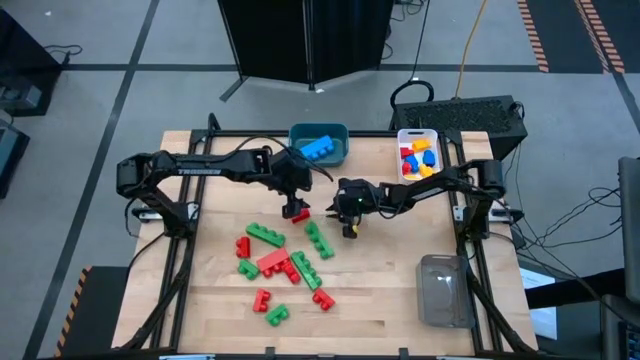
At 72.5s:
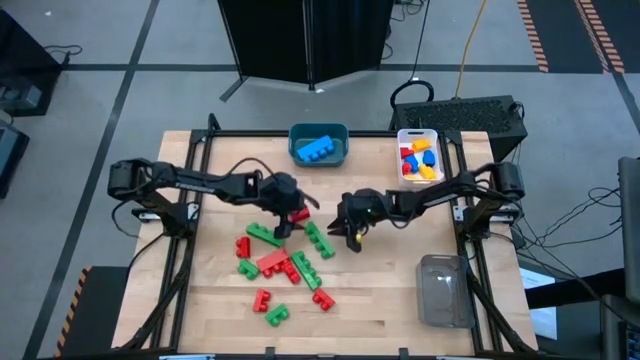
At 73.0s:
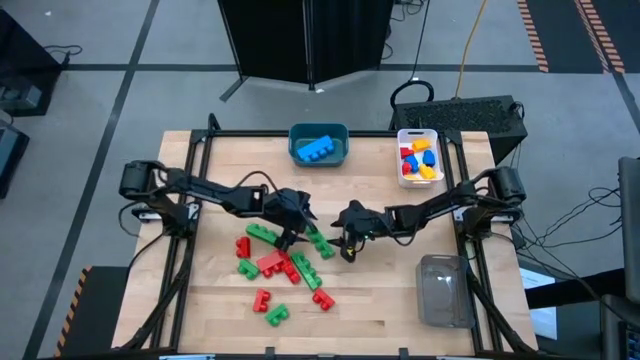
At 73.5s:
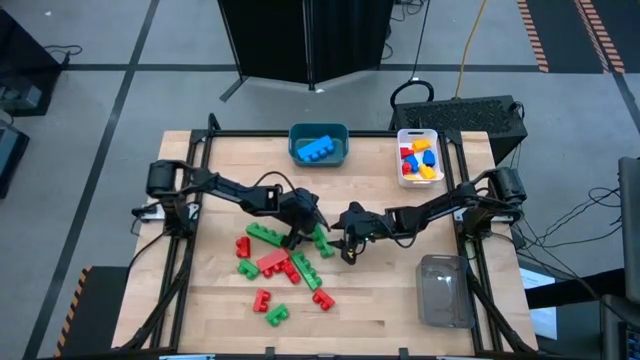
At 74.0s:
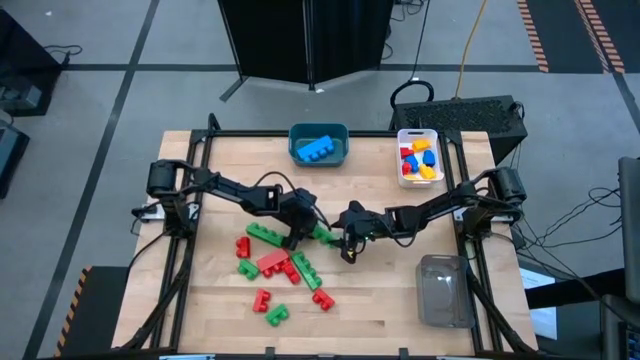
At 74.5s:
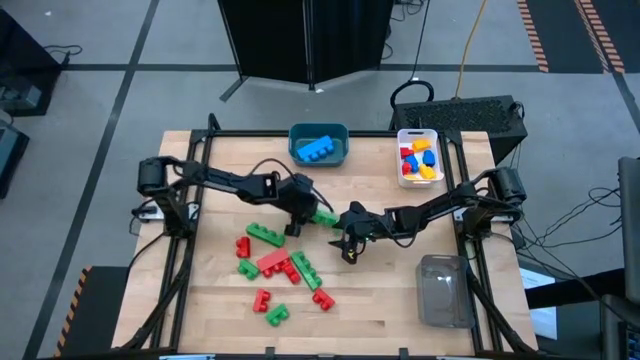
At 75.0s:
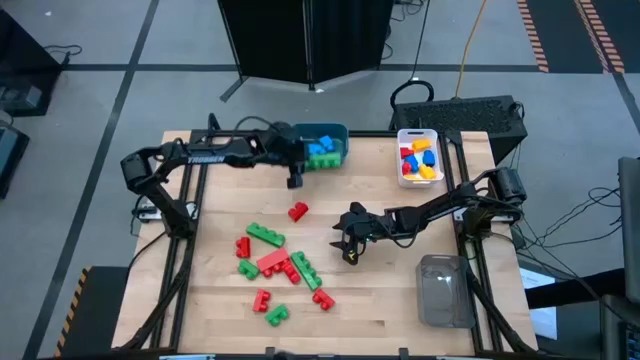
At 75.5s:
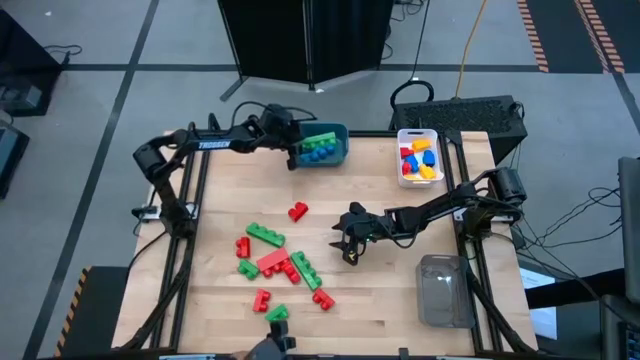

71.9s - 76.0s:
Task: Sort blocks by size
Put the four stud green game piece into the blue bin

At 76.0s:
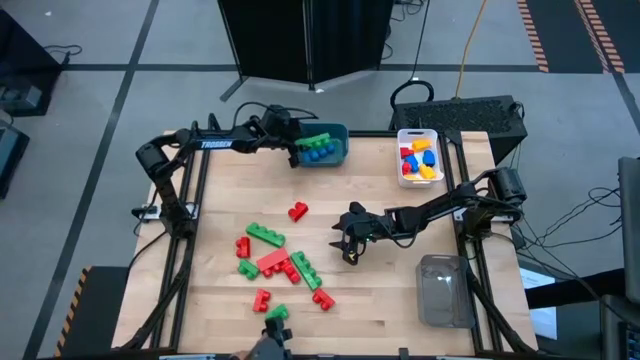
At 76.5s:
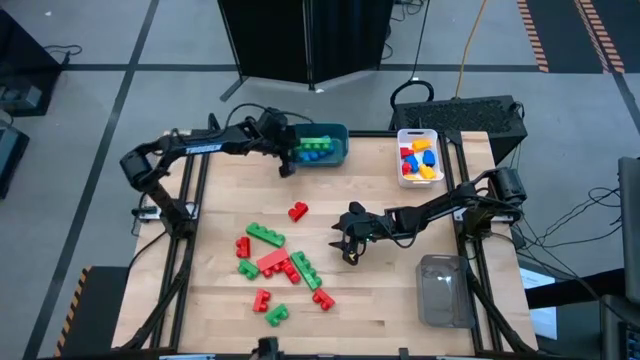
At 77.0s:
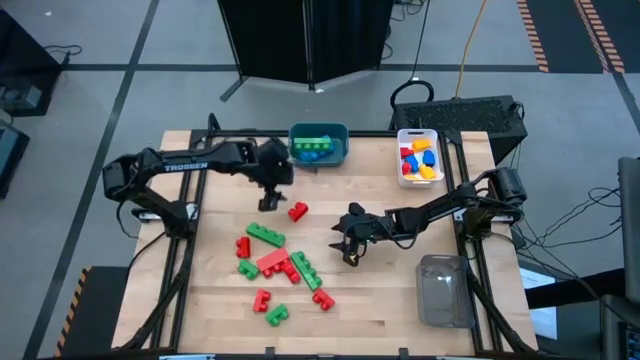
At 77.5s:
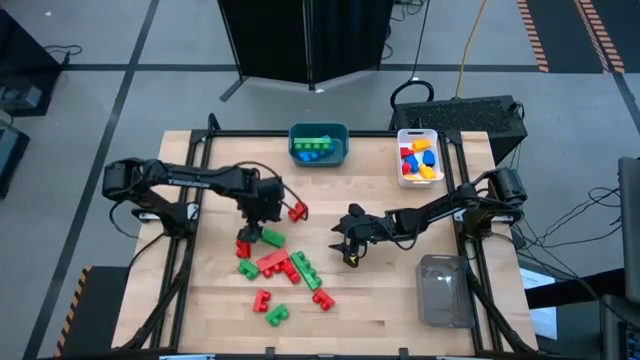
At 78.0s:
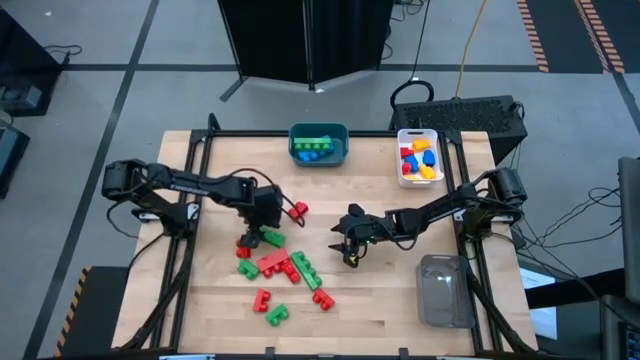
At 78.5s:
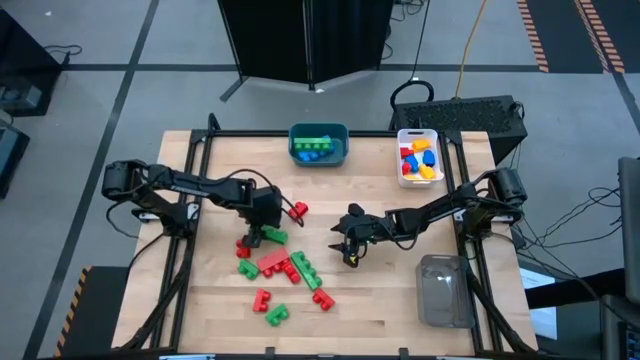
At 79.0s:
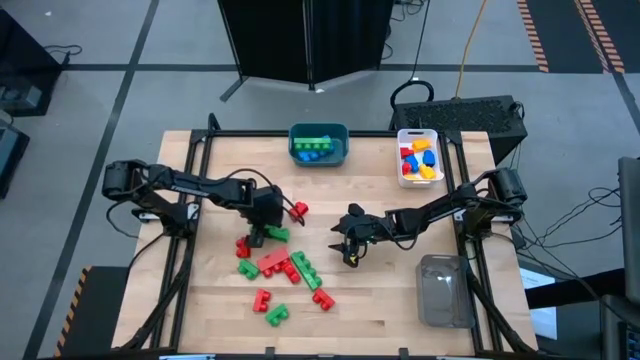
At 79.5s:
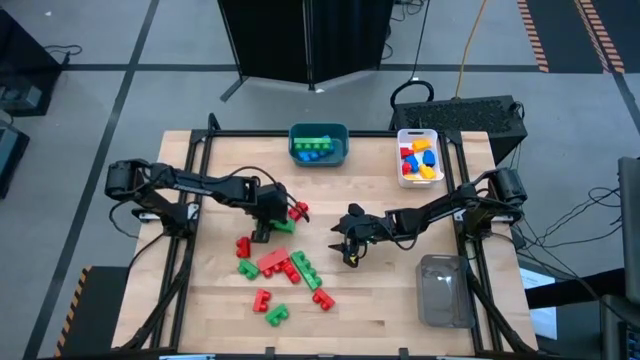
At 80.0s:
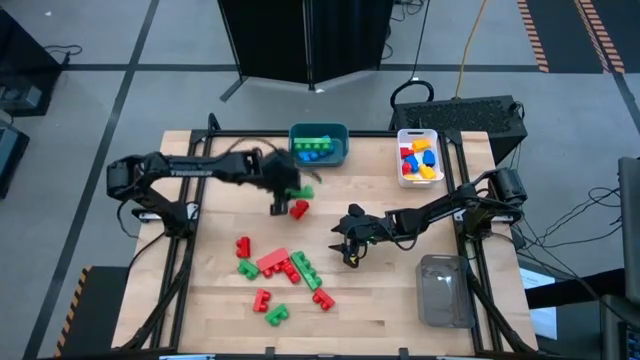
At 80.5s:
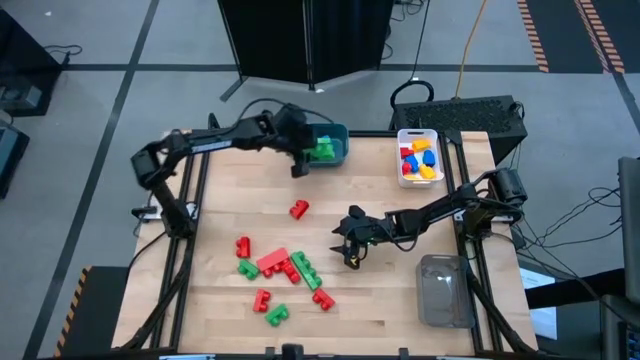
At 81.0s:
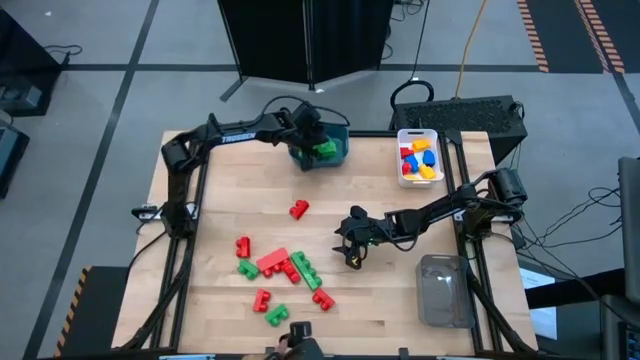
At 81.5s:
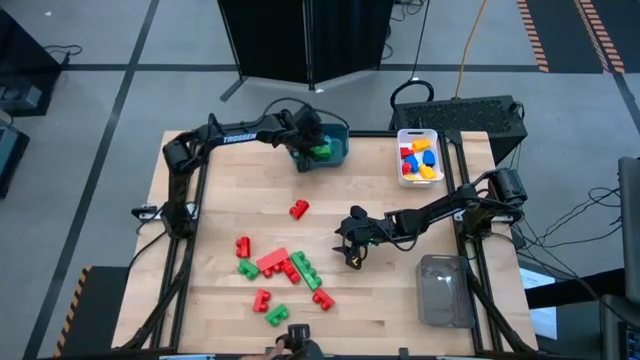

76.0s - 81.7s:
Put the four stud green game piece into the blue bin

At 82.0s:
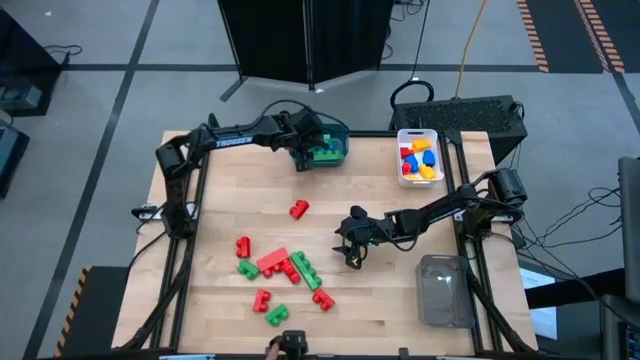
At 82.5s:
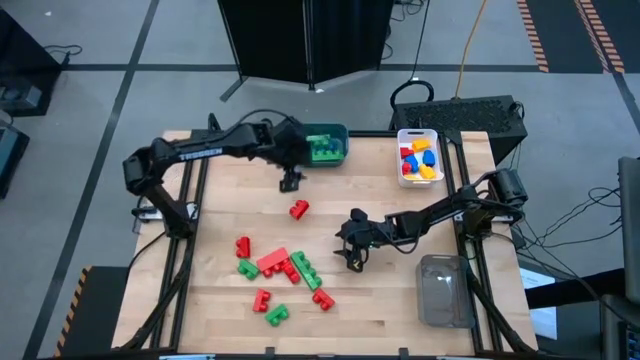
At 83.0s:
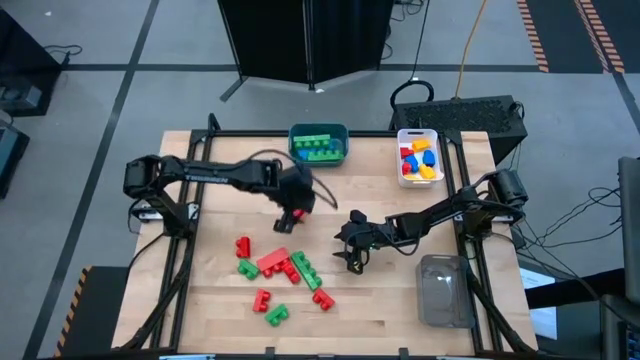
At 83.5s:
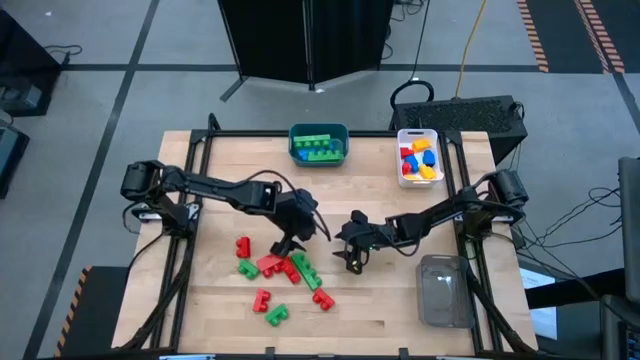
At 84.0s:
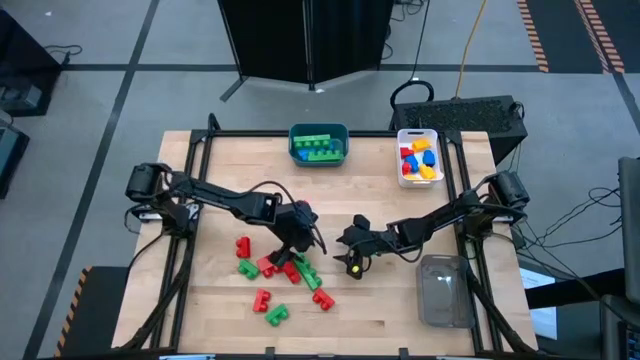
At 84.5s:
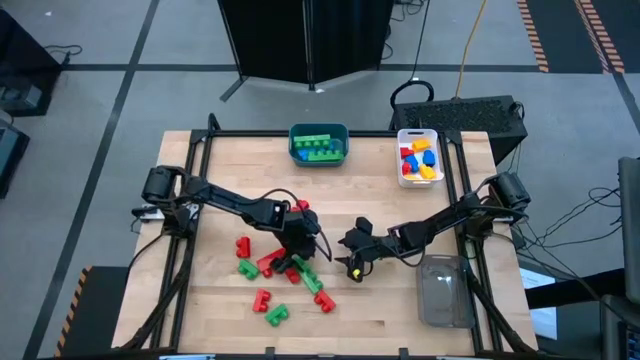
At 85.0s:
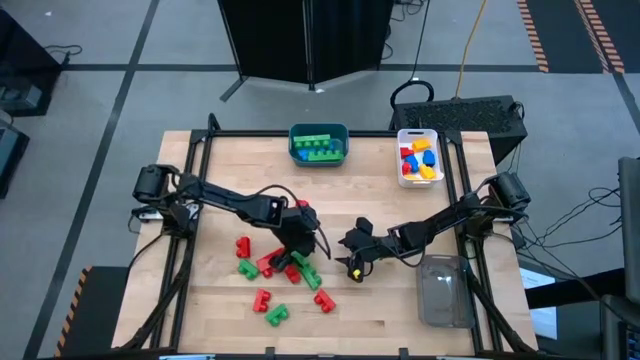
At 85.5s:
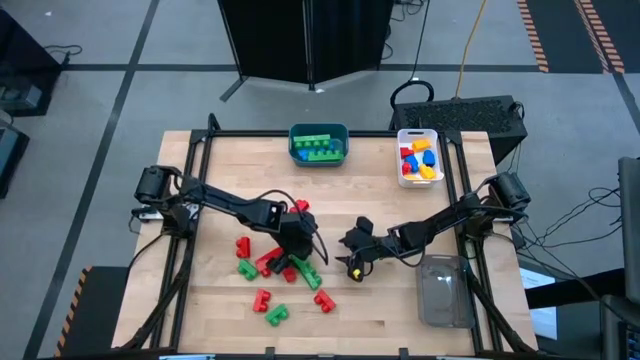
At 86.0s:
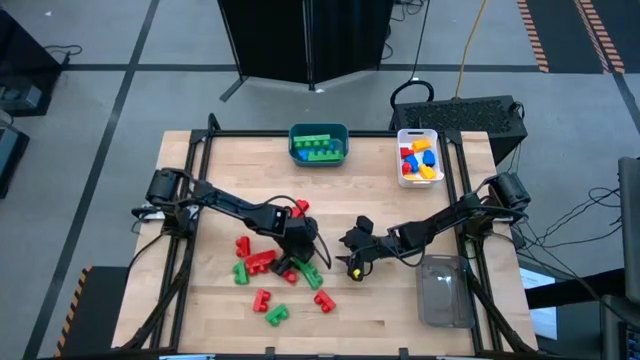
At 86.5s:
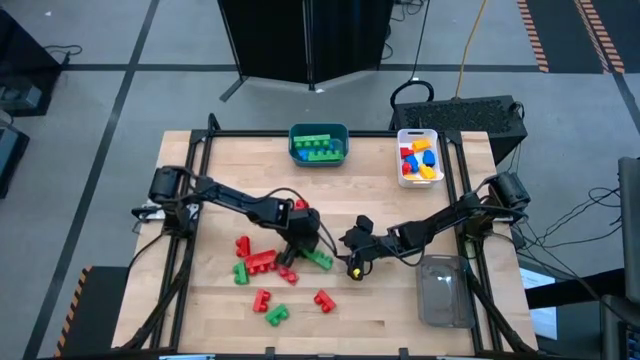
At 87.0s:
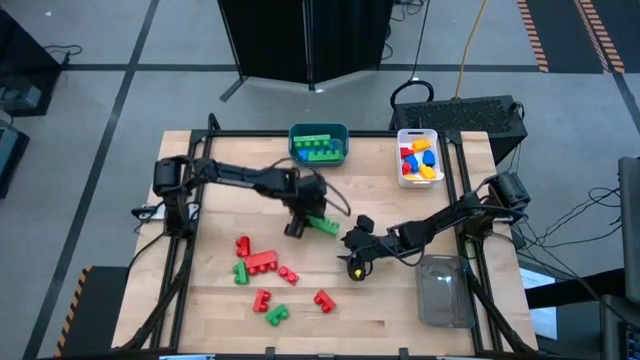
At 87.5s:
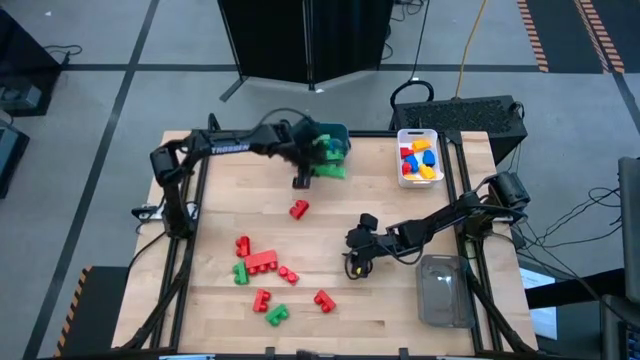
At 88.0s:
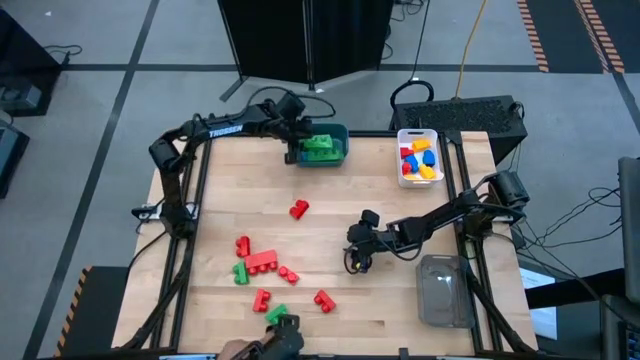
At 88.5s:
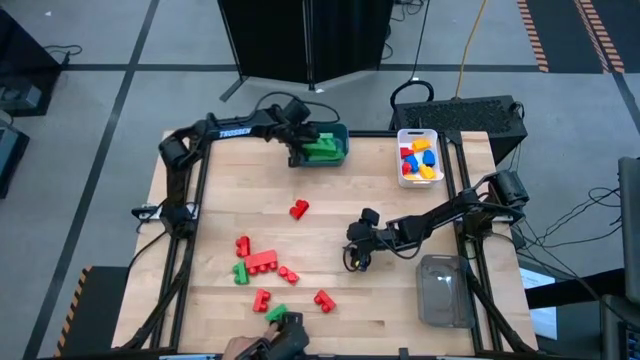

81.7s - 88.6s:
Put the four stud green game piece into the blue bin

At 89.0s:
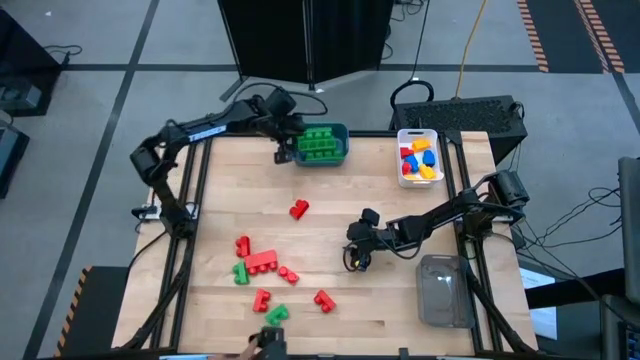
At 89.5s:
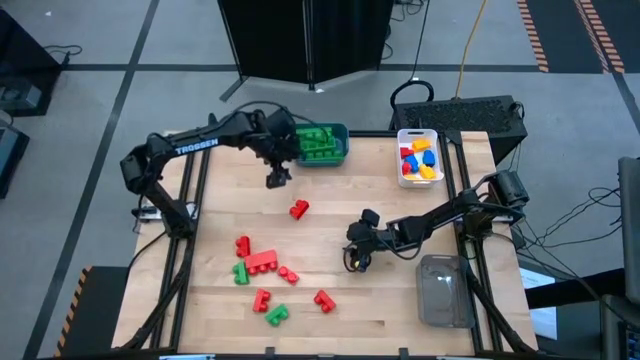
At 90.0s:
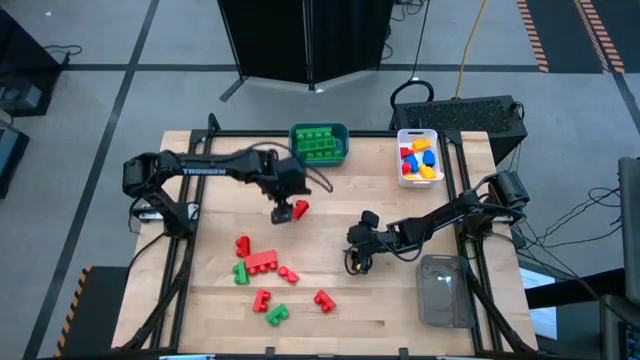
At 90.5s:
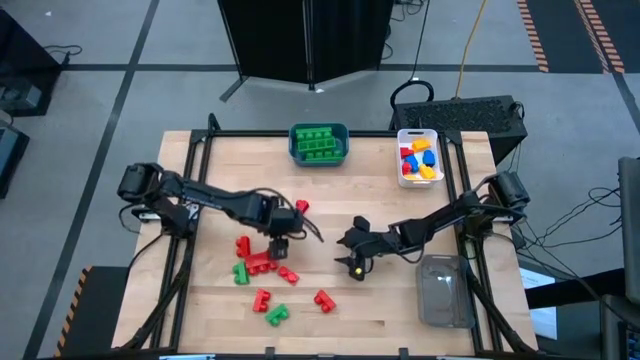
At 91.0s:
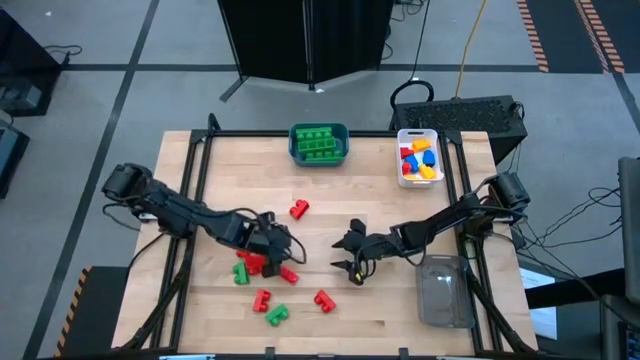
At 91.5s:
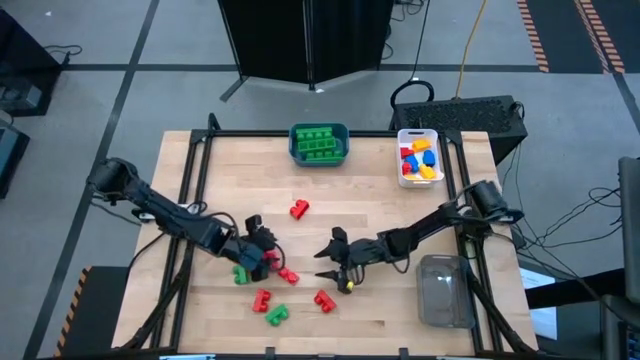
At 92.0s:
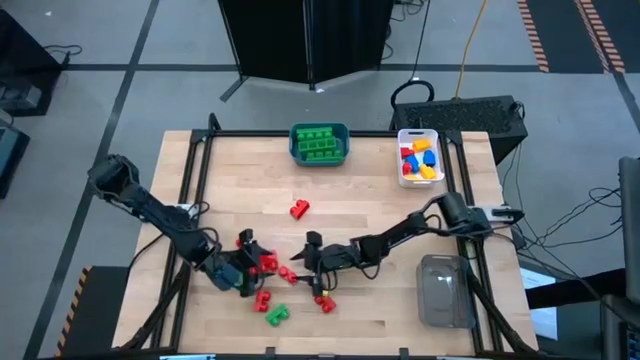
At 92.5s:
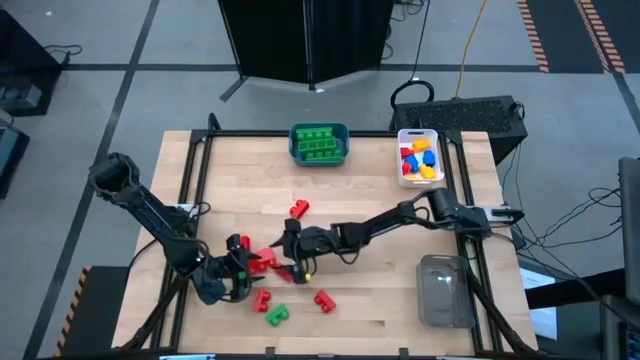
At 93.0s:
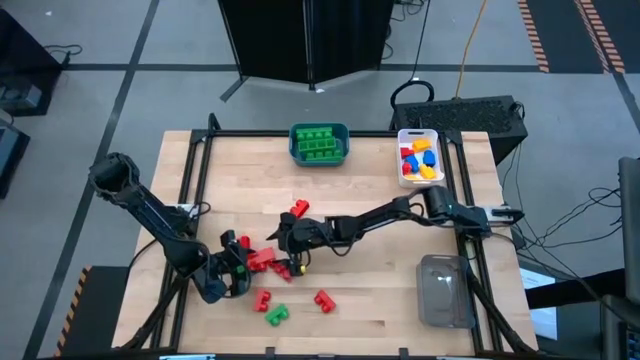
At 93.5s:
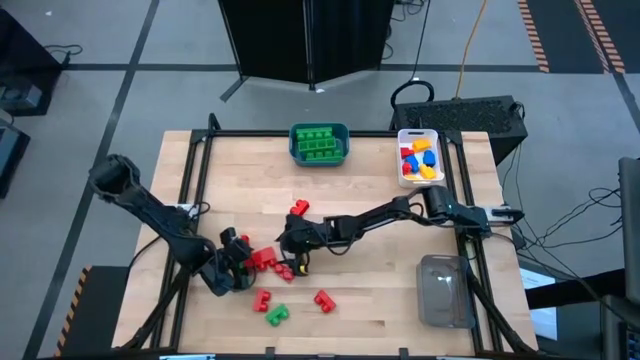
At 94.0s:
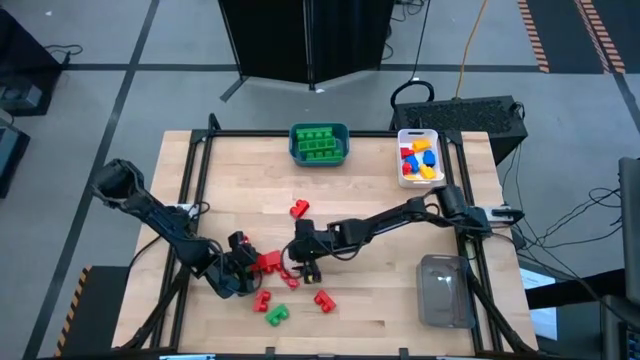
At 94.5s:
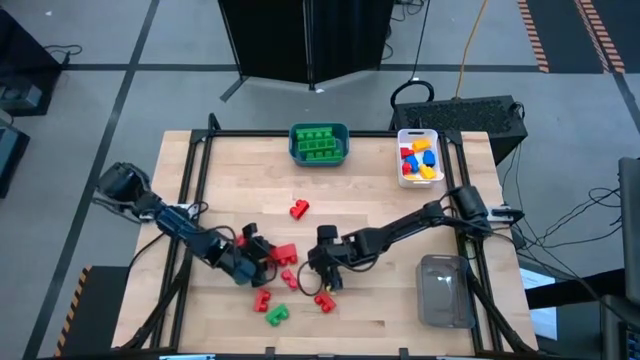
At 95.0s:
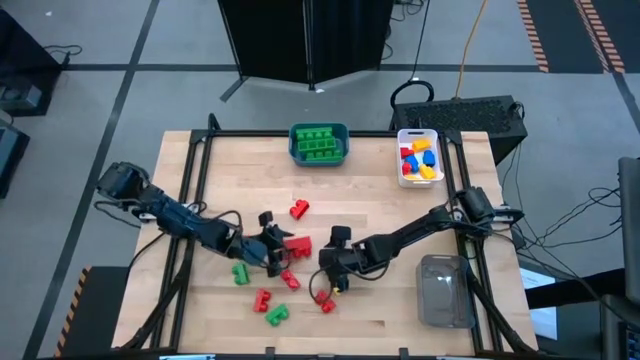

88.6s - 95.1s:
Put the three stud red game piece into the blue bin
